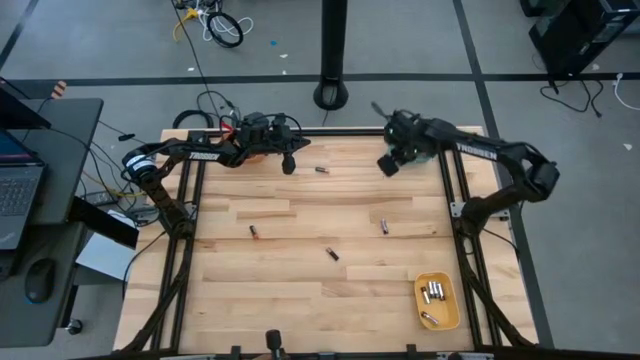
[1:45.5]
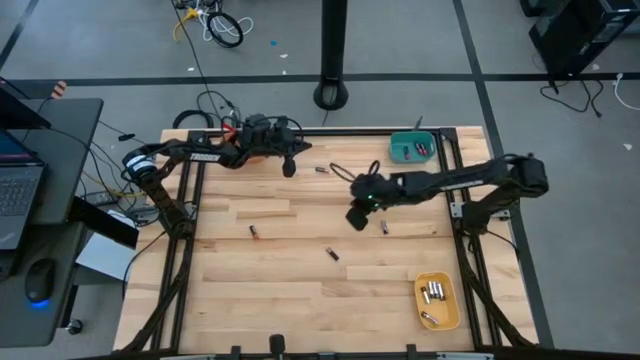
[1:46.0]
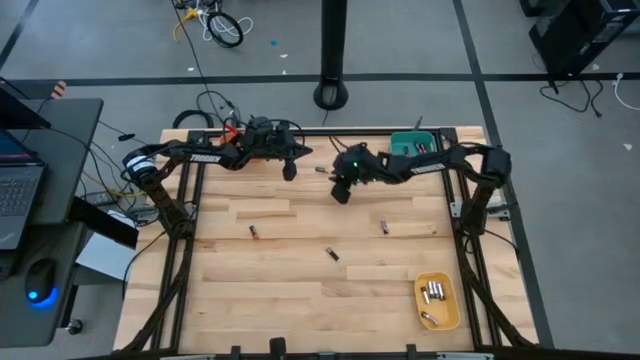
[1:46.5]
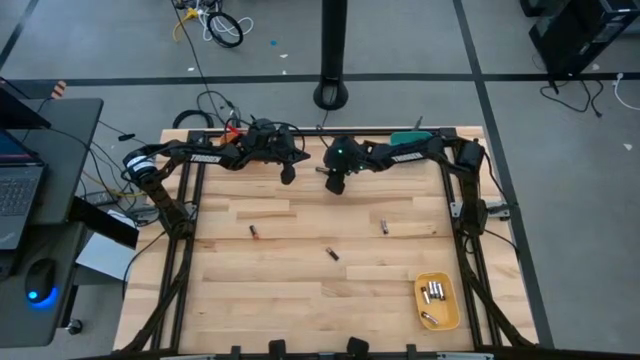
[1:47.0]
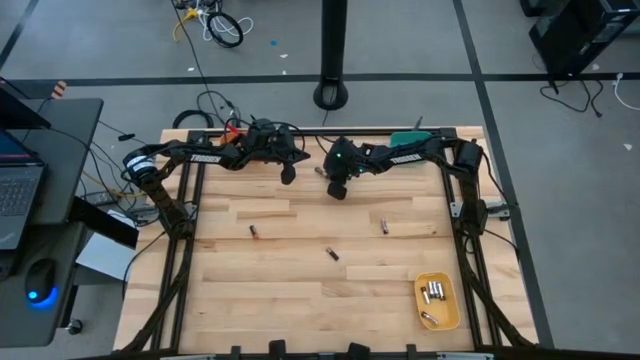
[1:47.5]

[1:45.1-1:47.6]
Task: Sort batteries
Put the black-orange battery into the orange bin

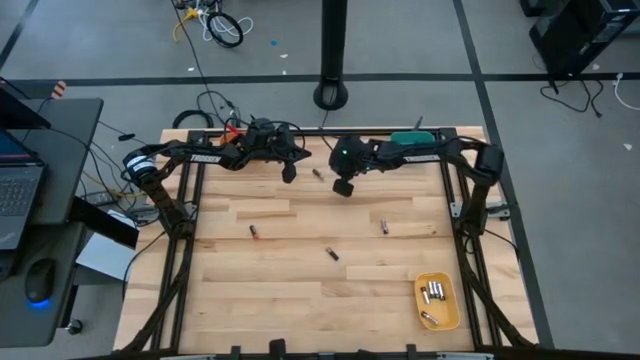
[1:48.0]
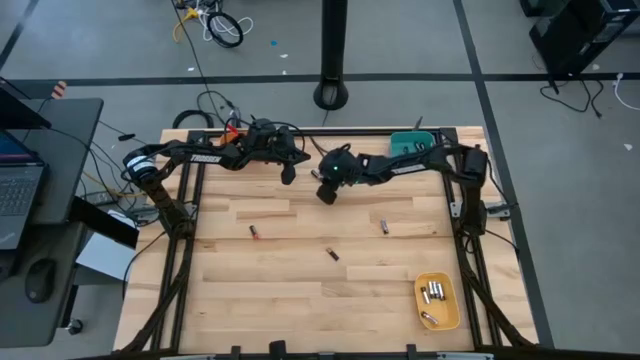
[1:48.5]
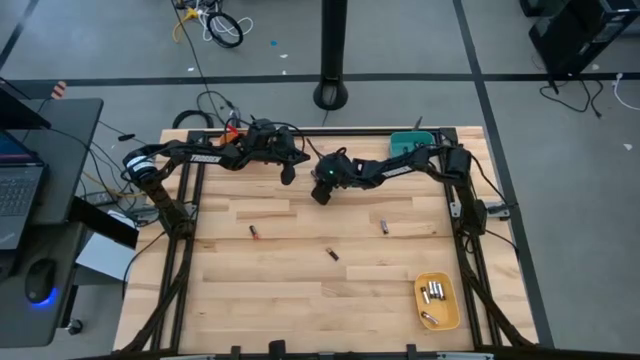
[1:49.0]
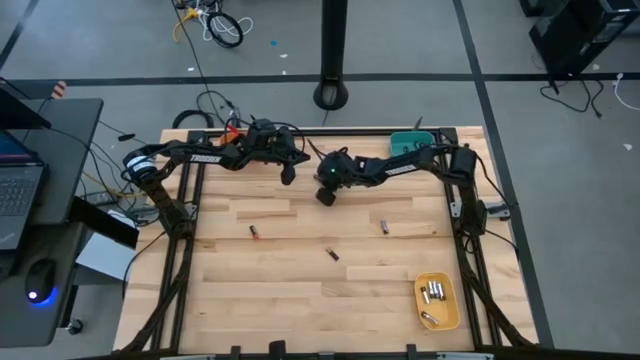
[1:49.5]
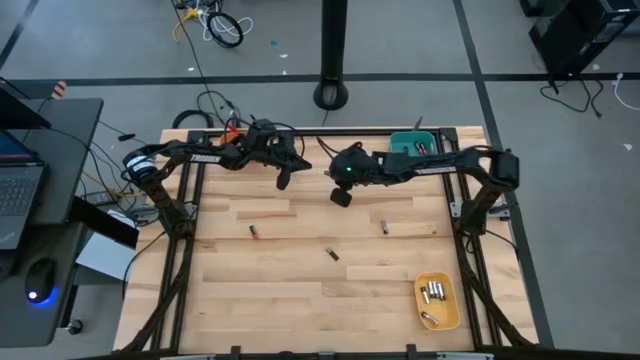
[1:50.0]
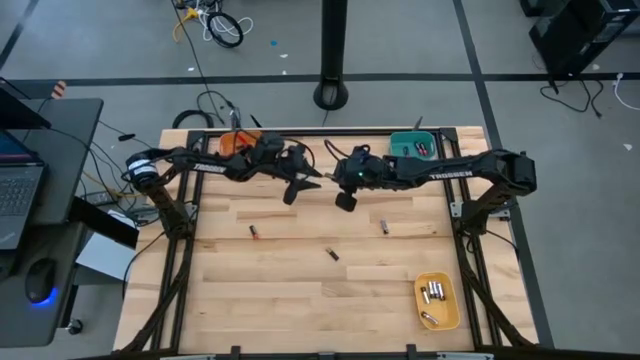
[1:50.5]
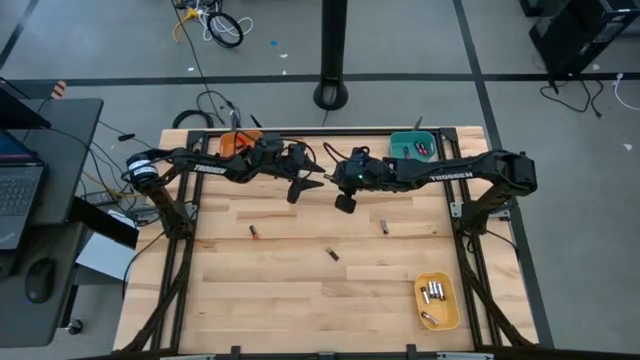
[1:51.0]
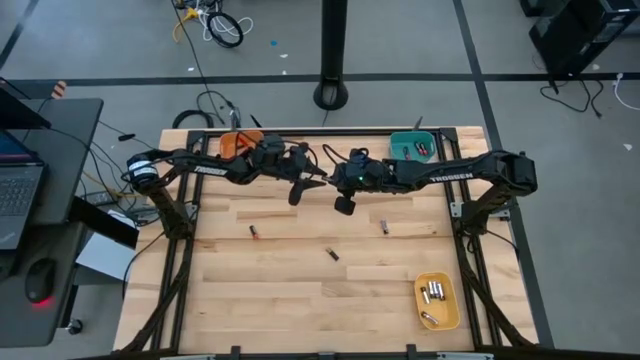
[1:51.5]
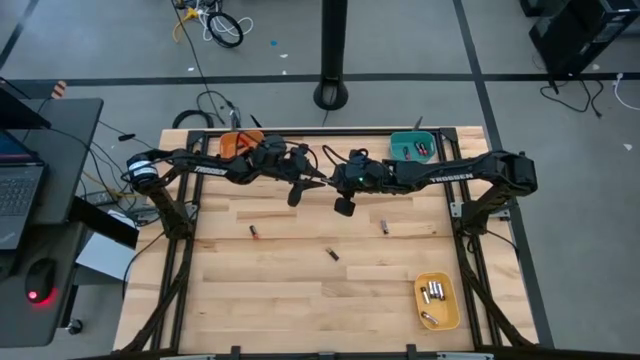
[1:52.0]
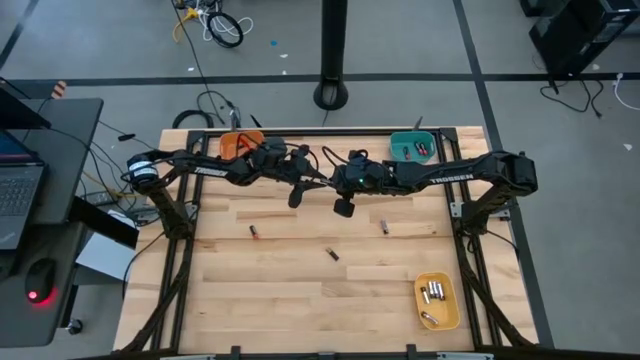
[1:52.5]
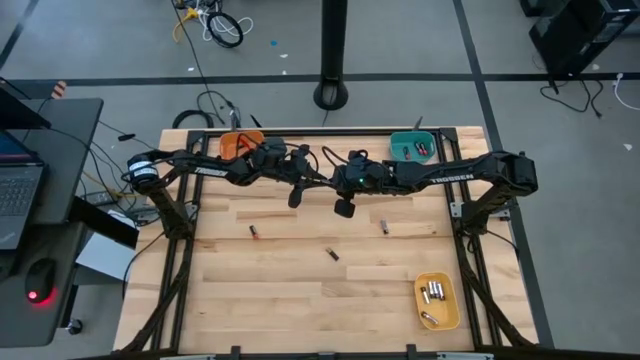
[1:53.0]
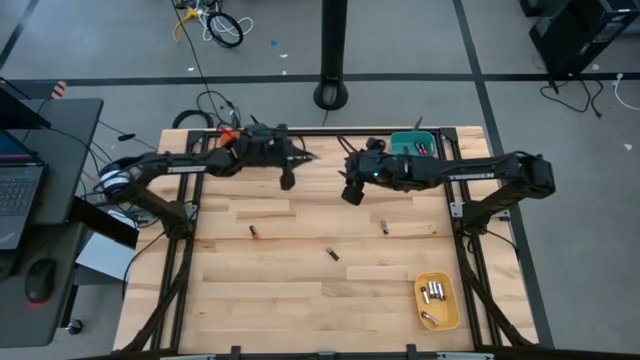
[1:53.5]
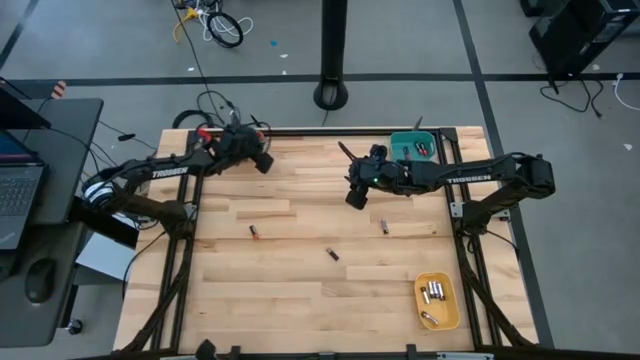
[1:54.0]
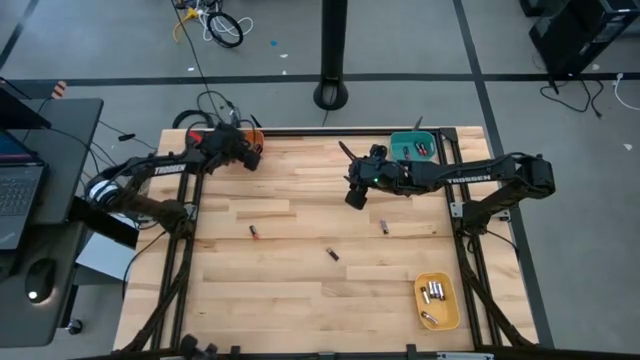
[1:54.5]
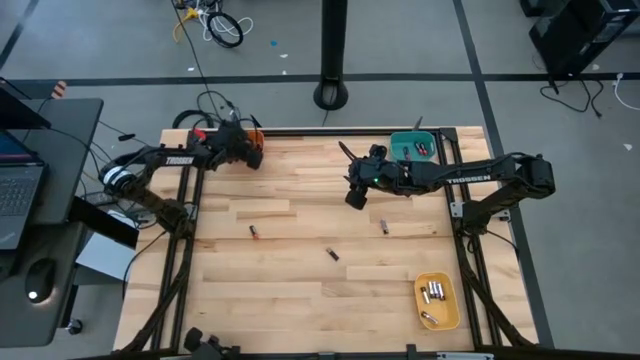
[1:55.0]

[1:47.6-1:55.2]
Put the black-orange battery into the orange bin

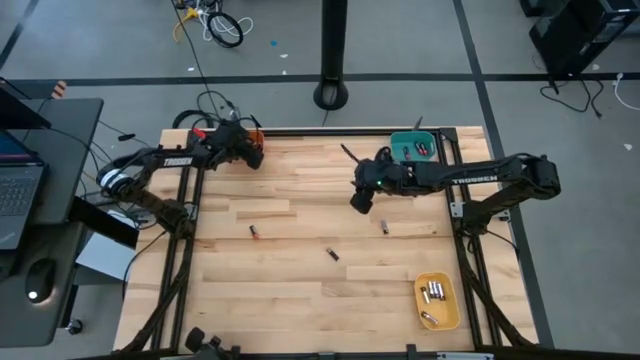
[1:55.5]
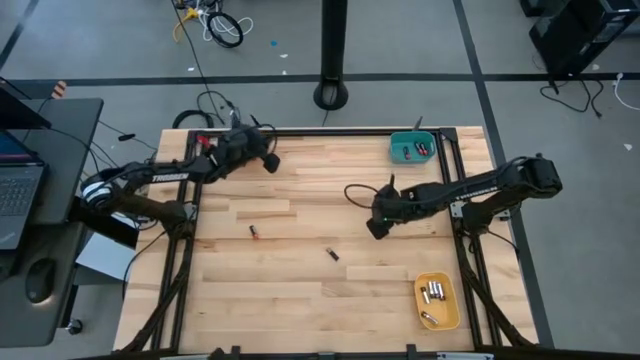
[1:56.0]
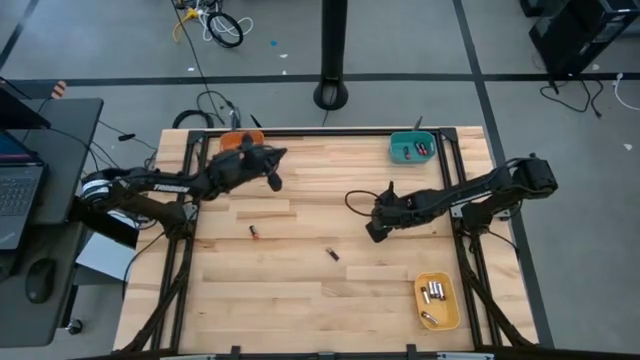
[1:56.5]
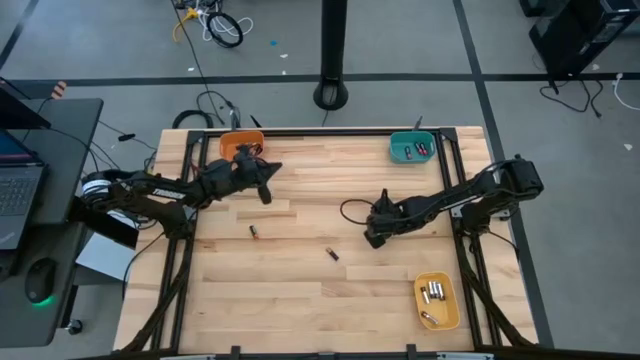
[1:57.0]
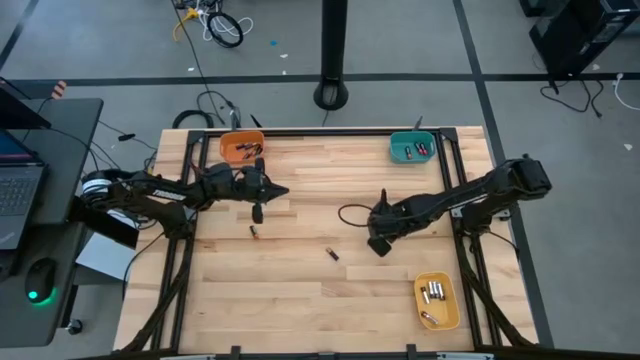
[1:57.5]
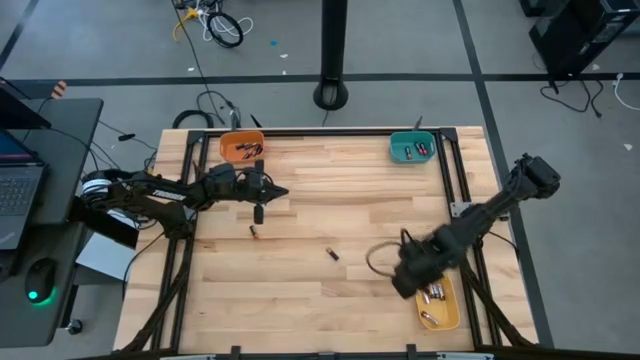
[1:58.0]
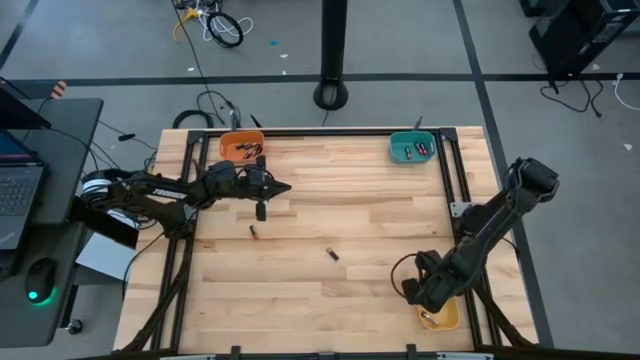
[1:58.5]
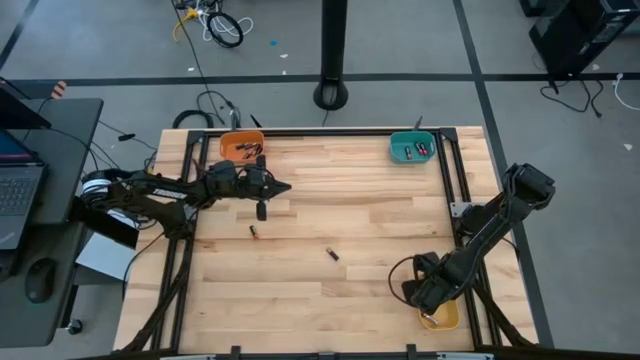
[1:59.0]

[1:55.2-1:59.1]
Put the silver battery into the yellow bin

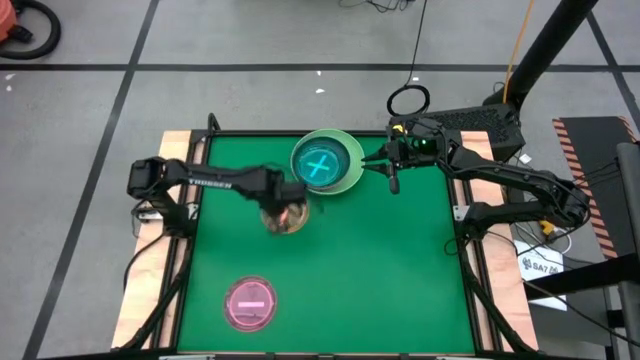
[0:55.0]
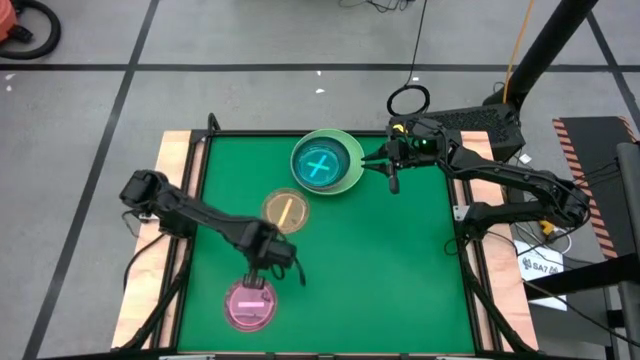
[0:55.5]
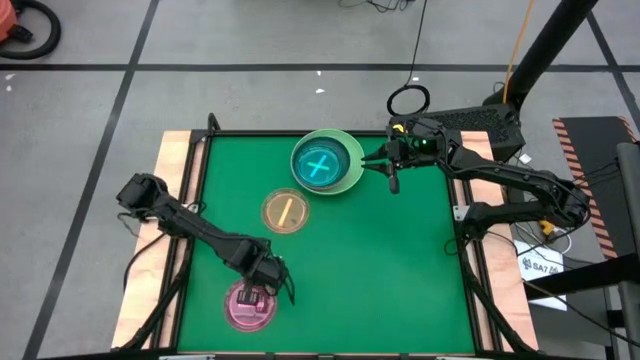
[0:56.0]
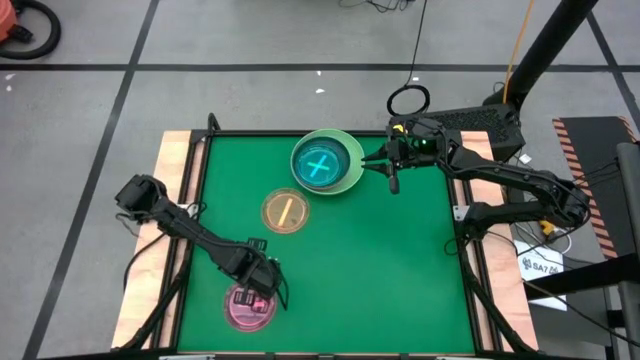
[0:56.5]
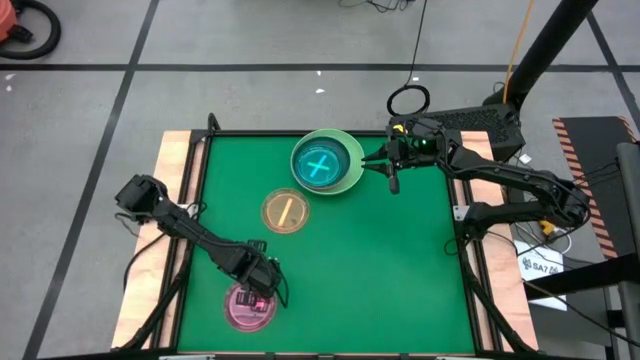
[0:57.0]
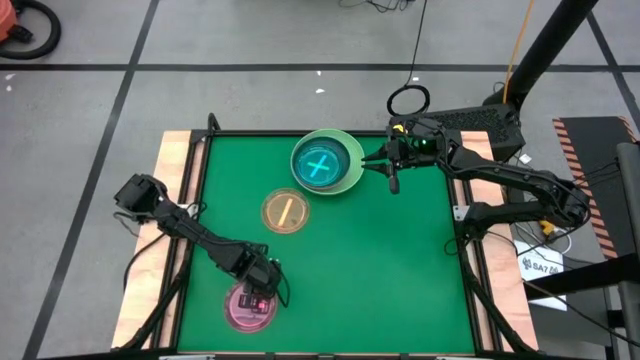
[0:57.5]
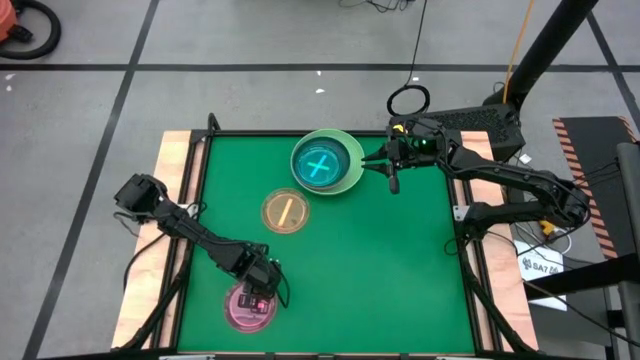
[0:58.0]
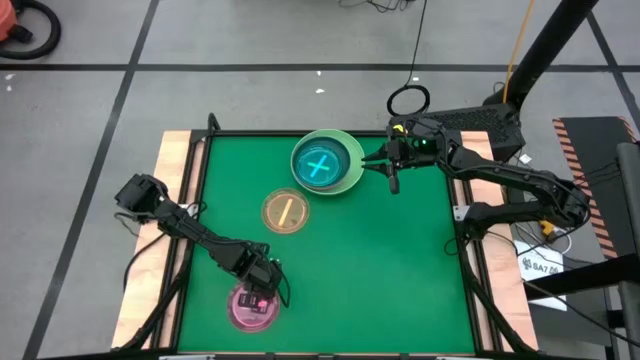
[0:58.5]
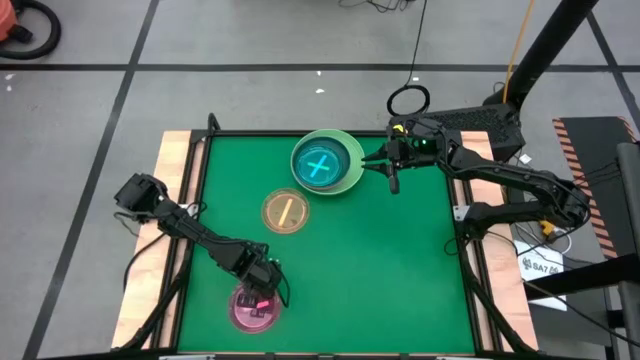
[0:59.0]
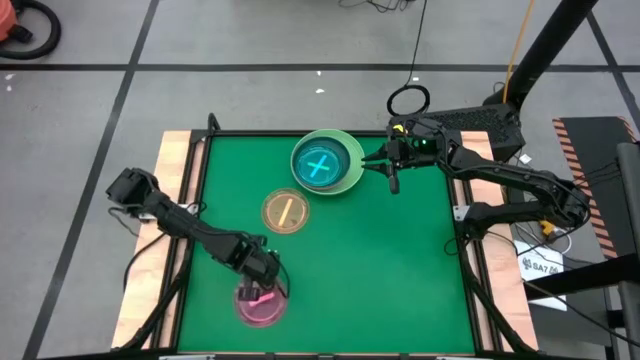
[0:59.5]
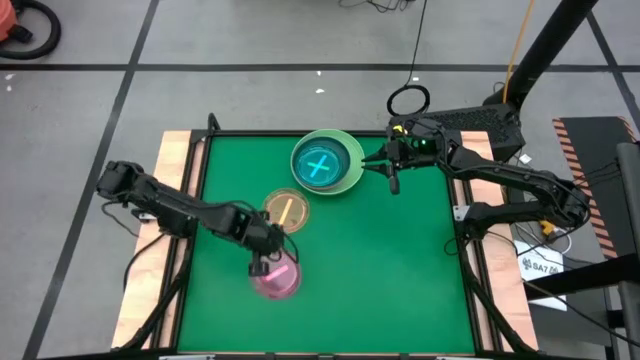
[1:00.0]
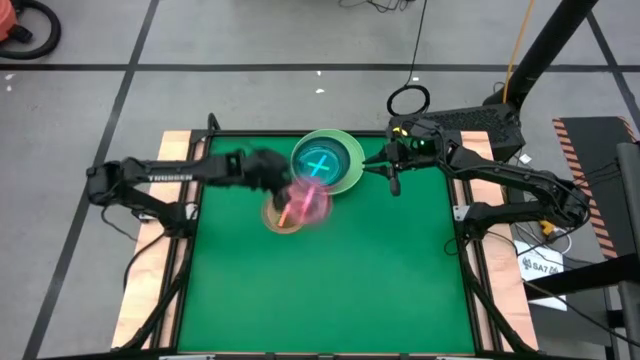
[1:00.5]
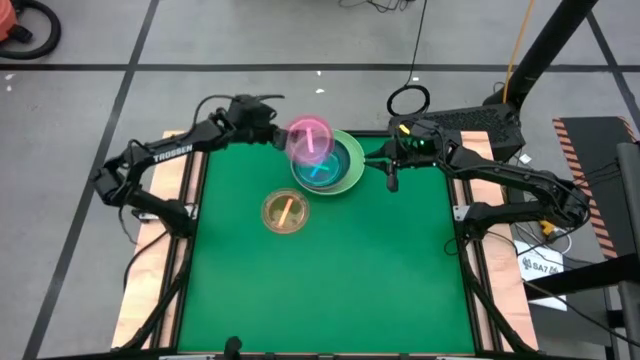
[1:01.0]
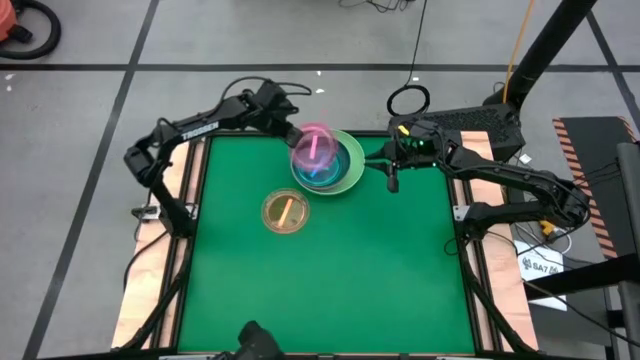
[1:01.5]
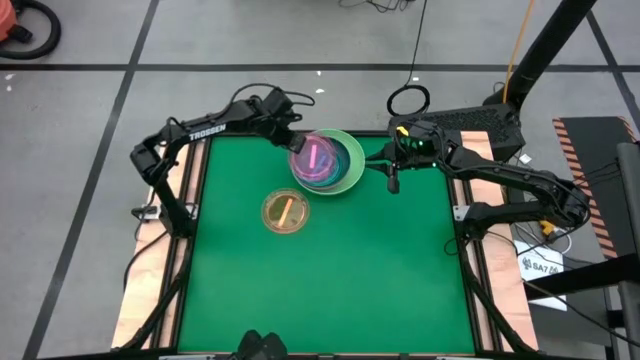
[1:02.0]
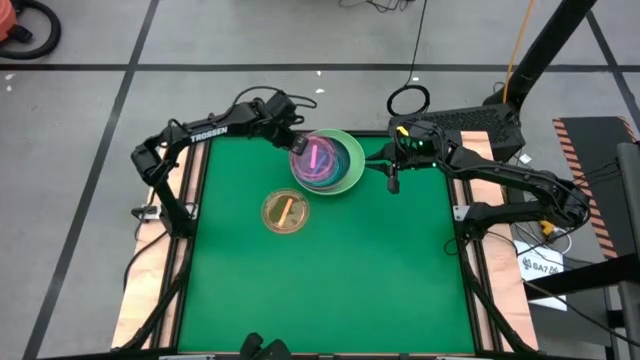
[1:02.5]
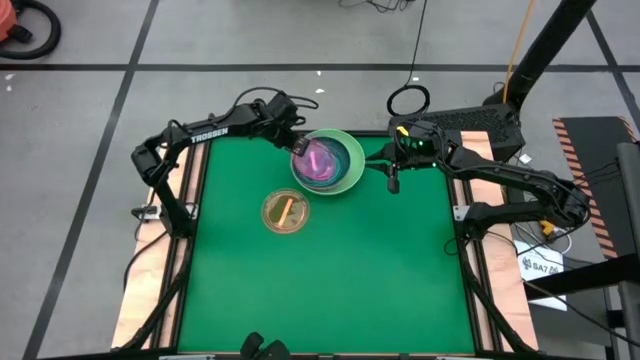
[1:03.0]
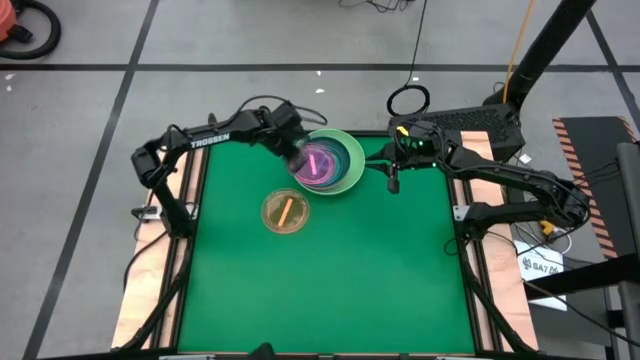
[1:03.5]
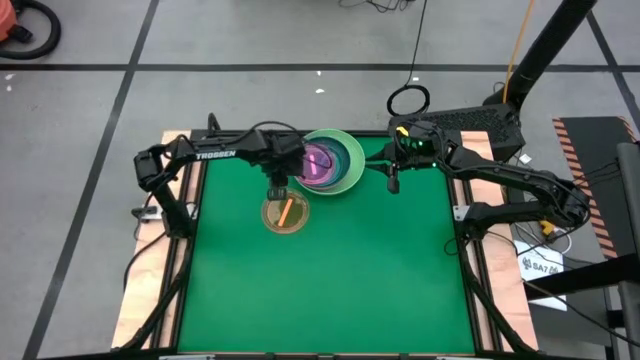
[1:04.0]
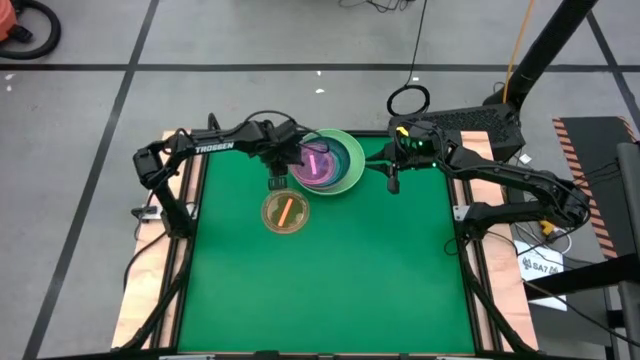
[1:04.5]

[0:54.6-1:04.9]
Task: Stack plastic plates
Stack the pink transparent plate on the blue transparent plate
